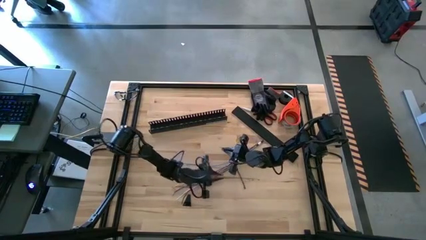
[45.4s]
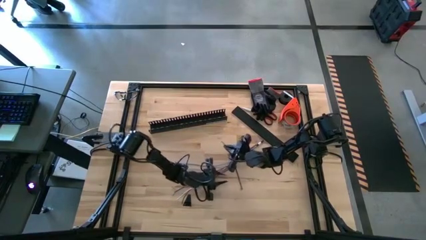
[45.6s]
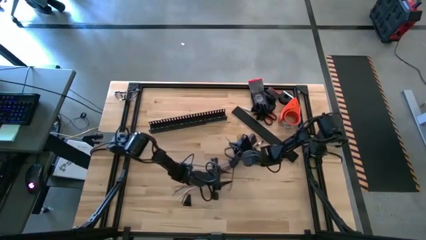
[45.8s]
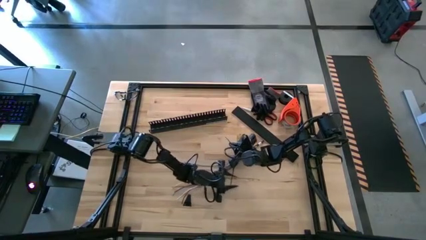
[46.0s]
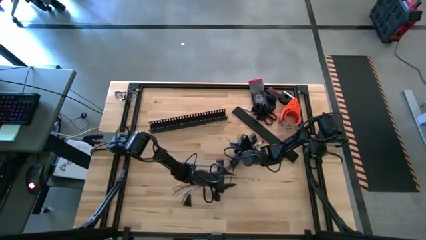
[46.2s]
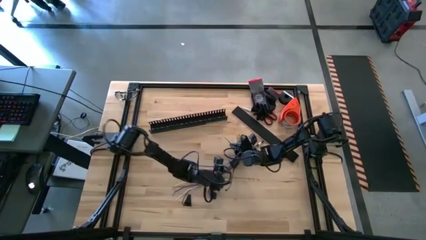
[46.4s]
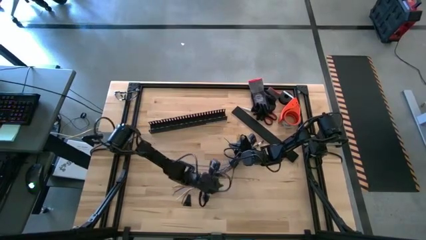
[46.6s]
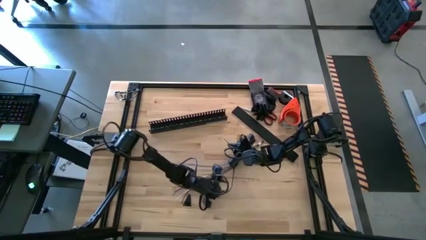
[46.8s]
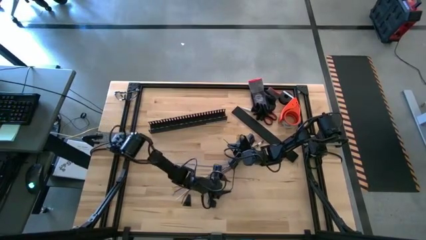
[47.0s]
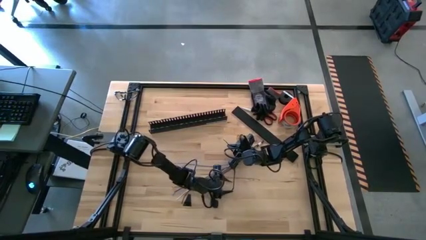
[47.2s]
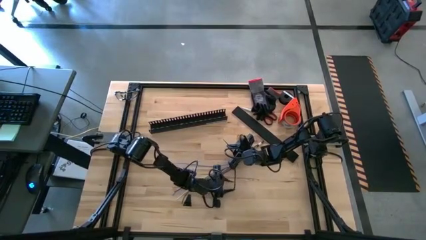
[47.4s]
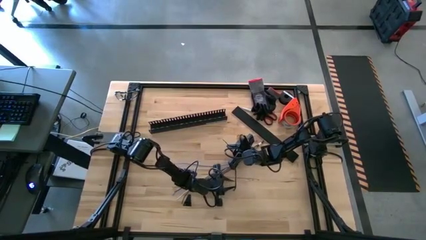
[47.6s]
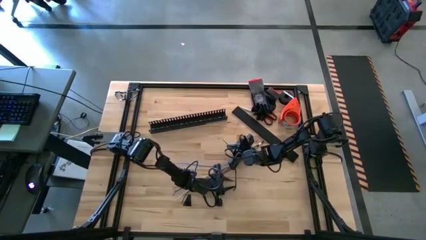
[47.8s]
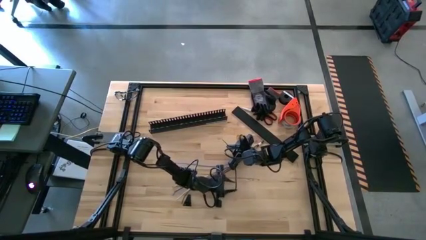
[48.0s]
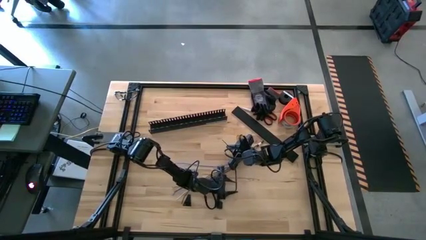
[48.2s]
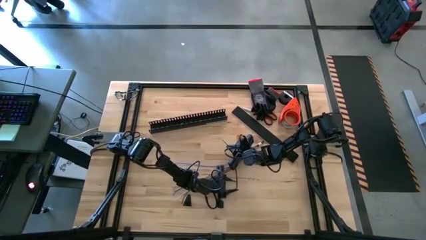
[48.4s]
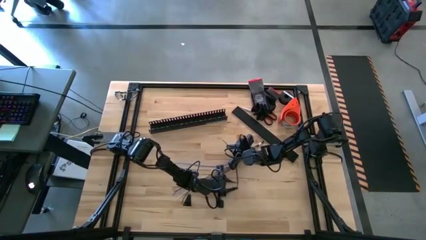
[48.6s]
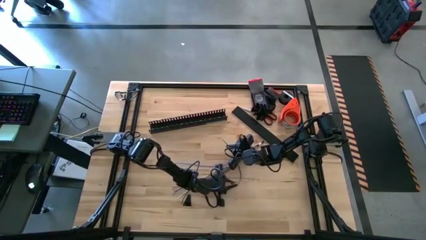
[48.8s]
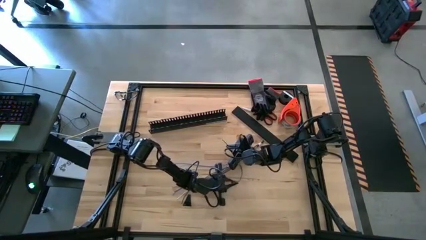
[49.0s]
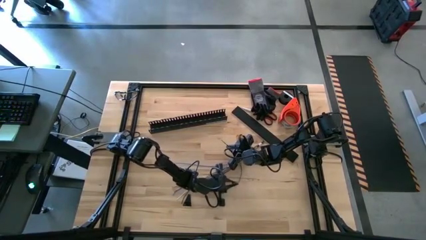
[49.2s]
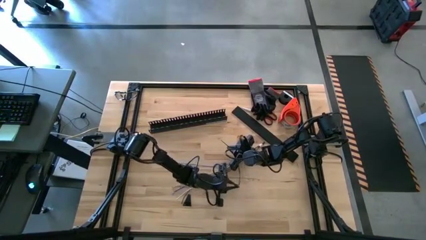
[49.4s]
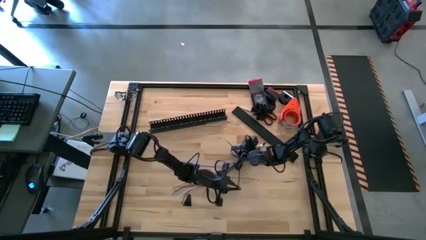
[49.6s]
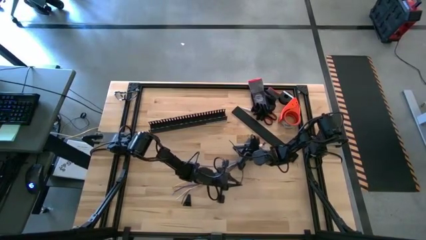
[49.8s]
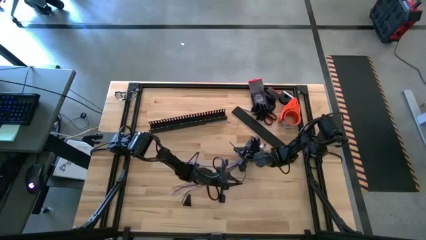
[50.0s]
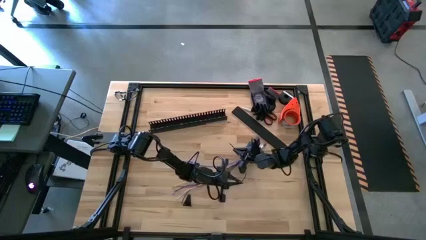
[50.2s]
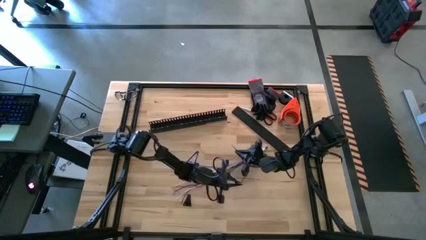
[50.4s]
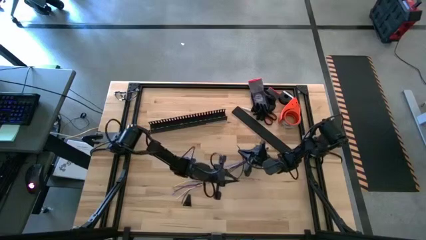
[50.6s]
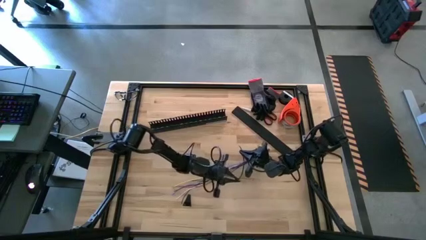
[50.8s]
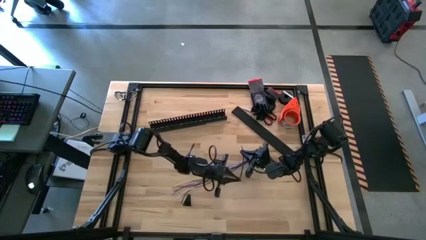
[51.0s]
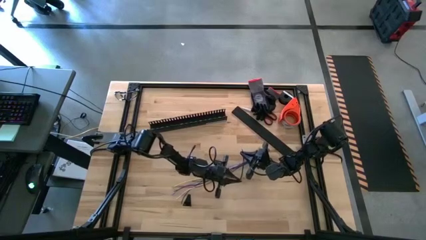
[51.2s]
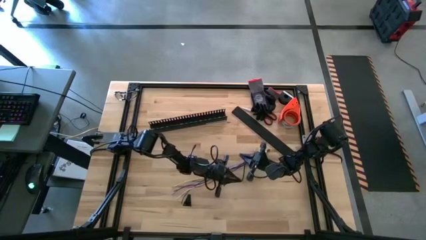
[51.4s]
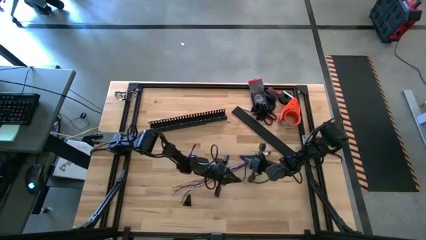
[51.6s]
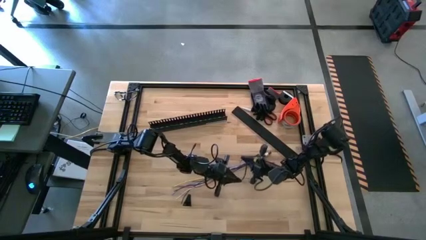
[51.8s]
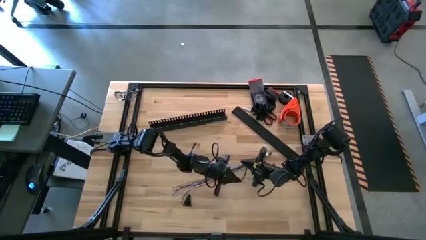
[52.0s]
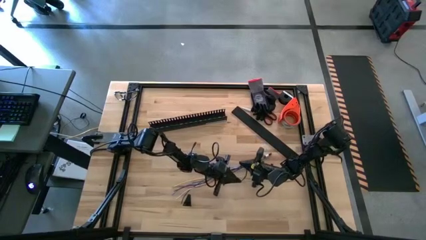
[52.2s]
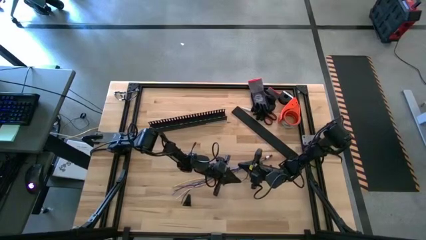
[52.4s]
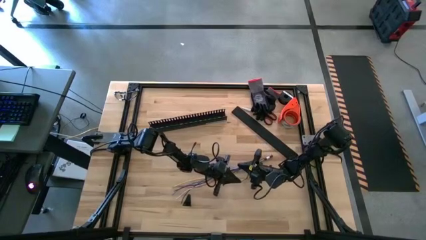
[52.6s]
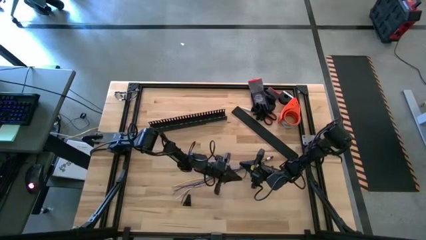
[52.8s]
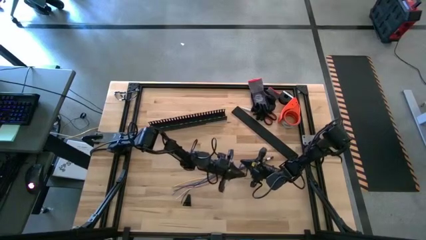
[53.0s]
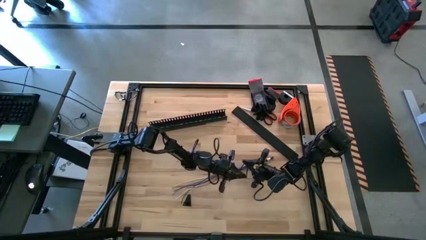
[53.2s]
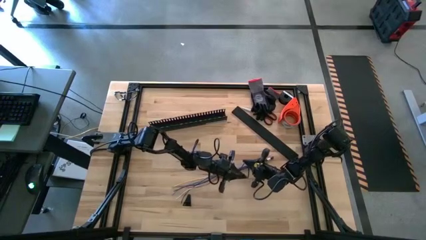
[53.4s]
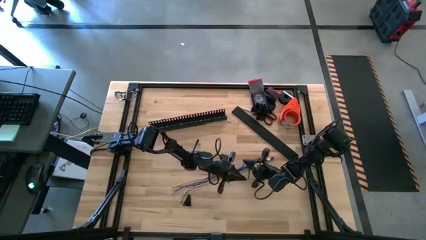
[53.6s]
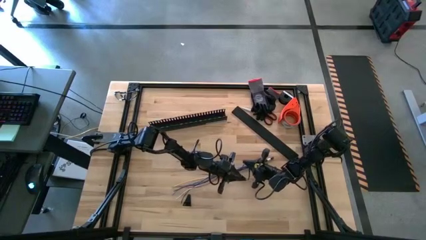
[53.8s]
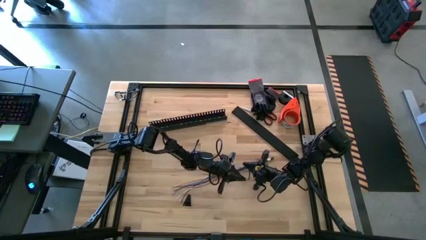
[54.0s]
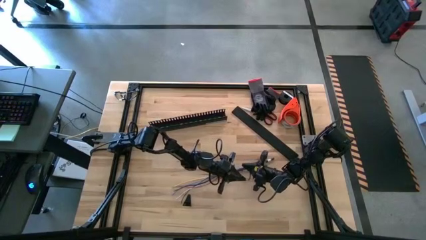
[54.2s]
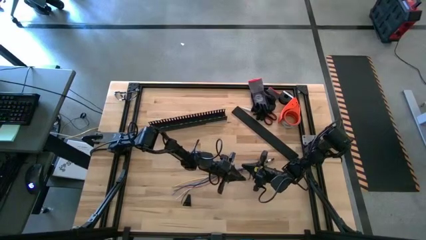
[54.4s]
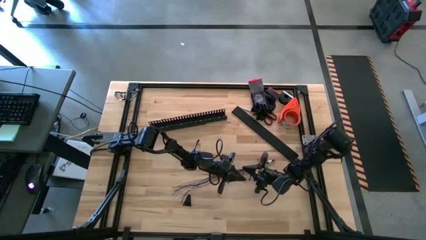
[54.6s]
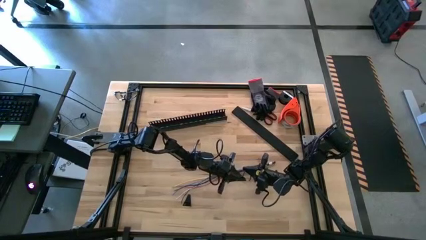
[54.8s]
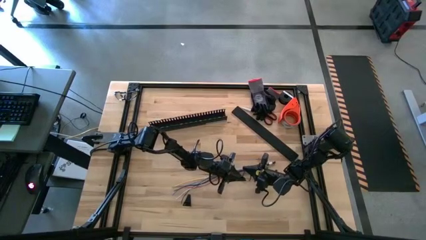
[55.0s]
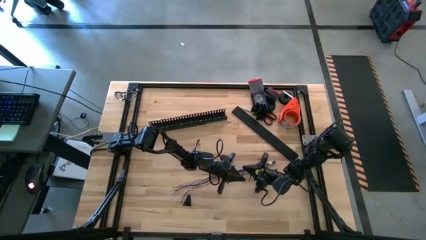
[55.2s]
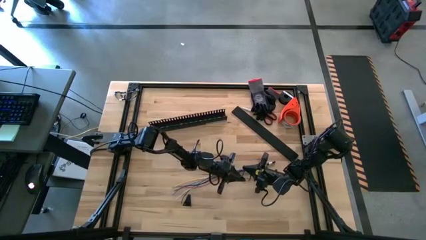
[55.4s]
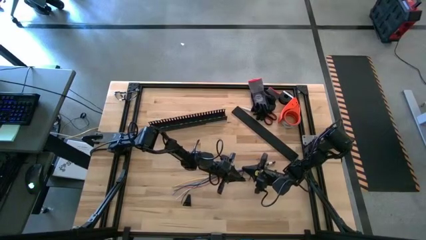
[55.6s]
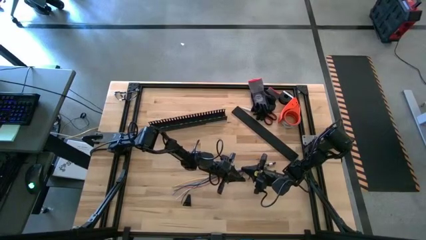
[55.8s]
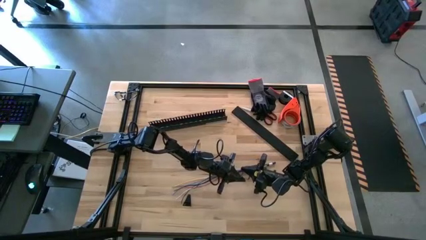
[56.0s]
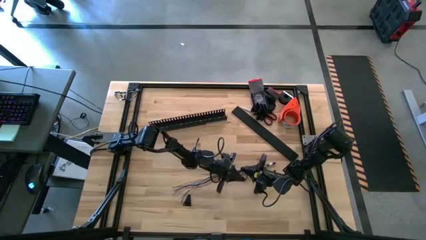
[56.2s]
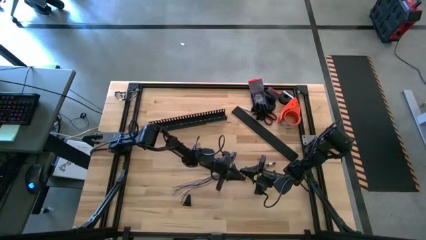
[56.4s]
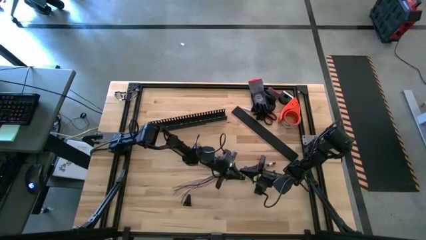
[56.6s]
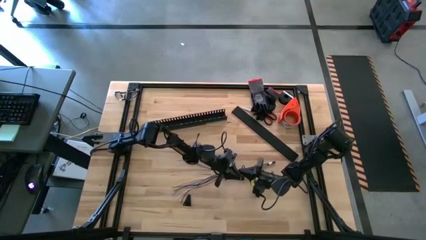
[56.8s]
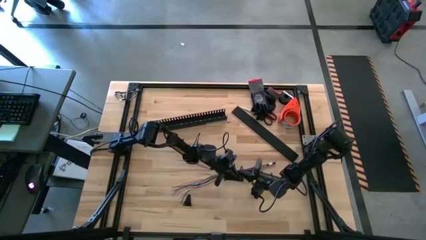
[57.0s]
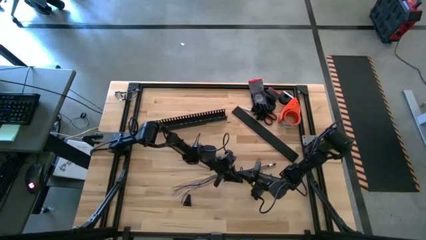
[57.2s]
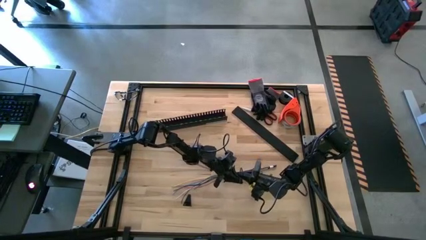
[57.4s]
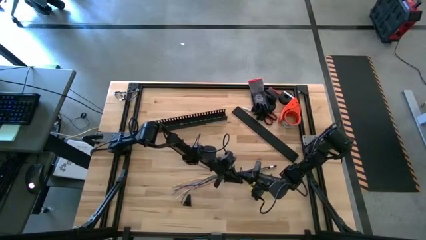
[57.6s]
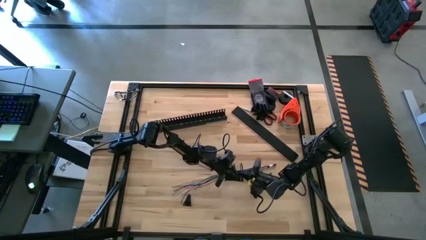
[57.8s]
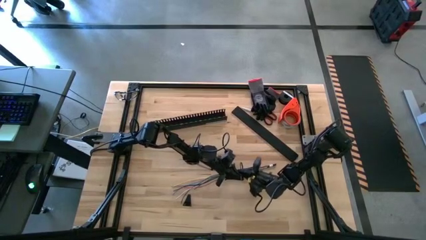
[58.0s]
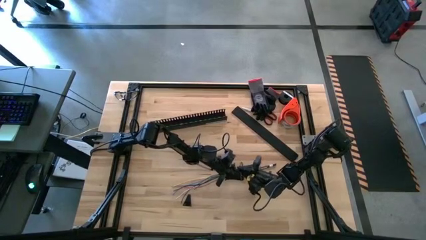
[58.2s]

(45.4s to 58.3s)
Task: Ziptie cables
Wrap the colored cables together using a zip tie

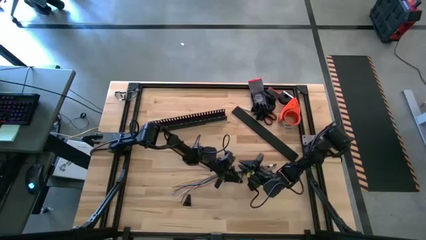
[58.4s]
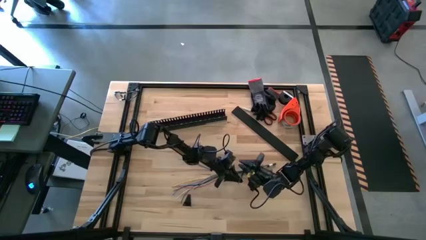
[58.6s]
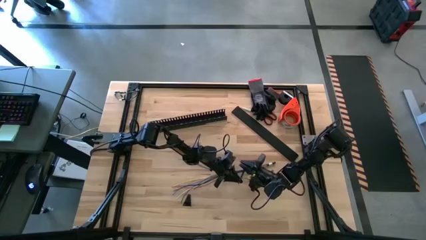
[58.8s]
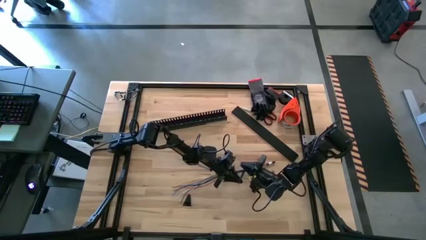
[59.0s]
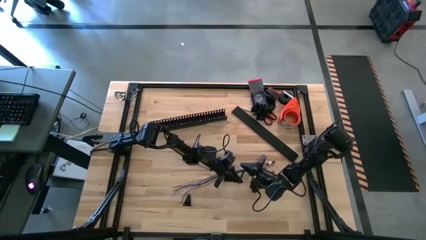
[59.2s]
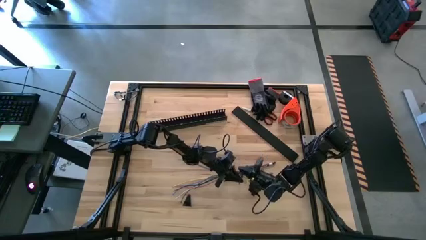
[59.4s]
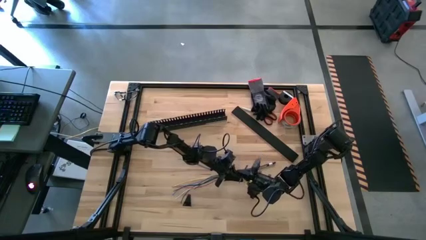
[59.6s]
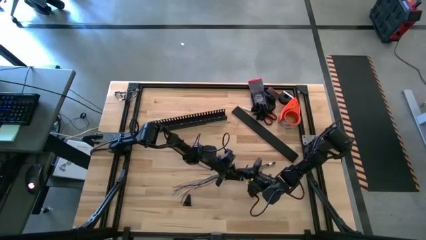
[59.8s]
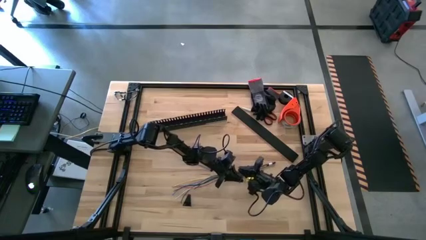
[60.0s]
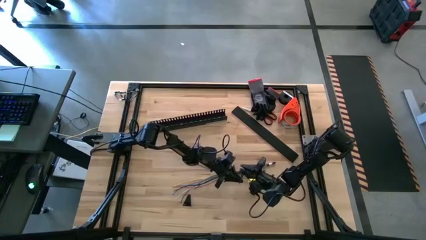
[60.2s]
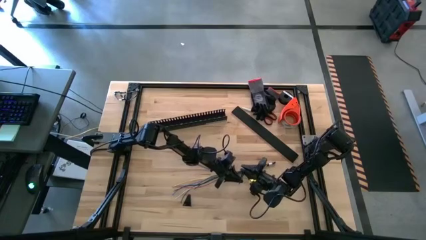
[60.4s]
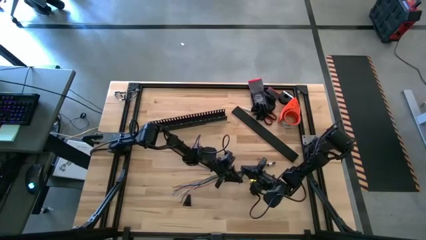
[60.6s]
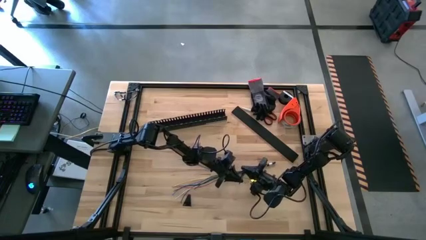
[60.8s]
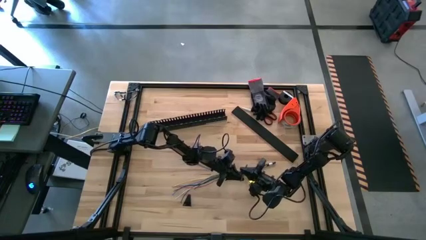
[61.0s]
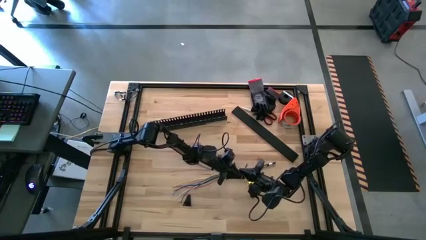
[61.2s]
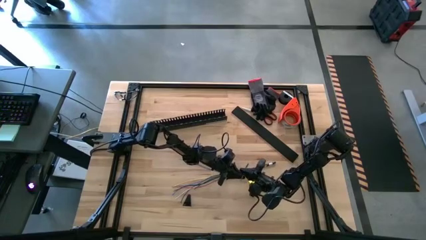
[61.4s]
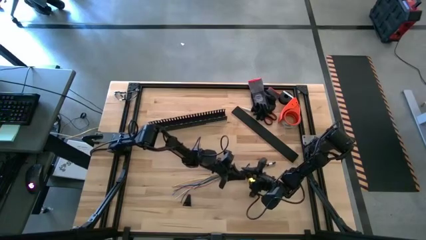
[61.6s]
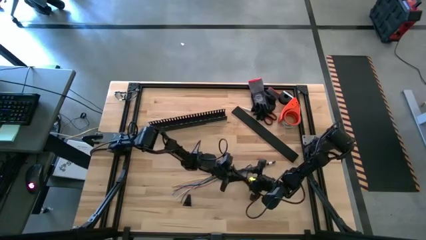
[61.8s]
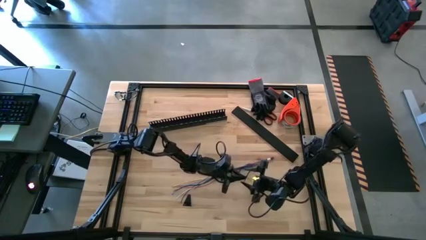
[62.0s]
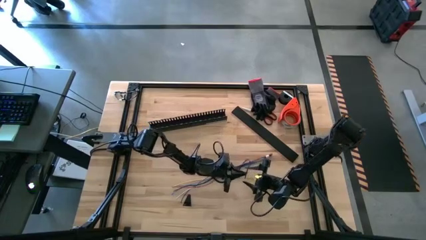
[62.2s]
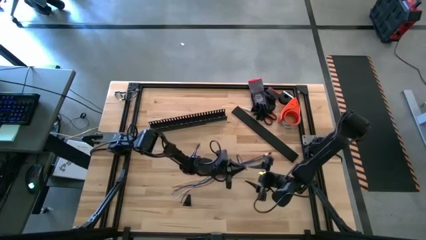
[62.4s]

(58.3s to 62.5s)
Wrap the colored cables together using a zip tie
